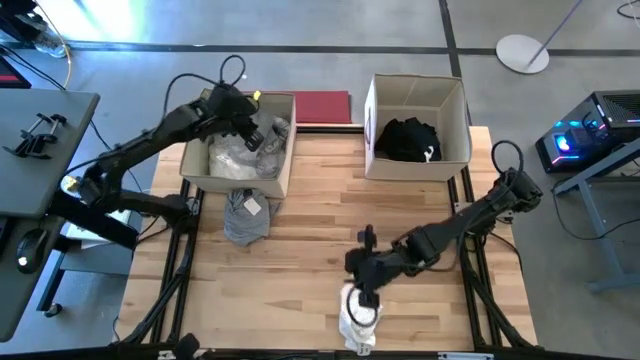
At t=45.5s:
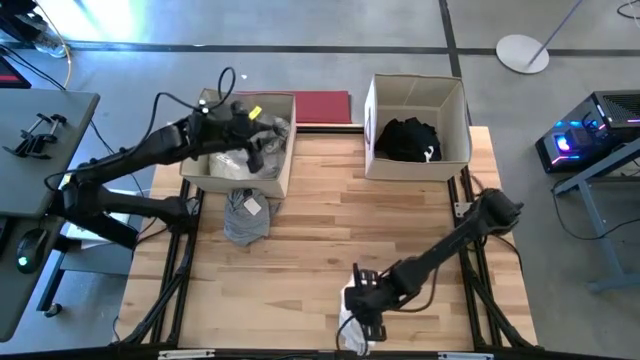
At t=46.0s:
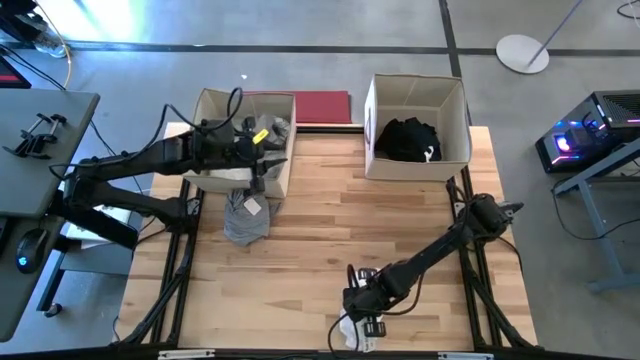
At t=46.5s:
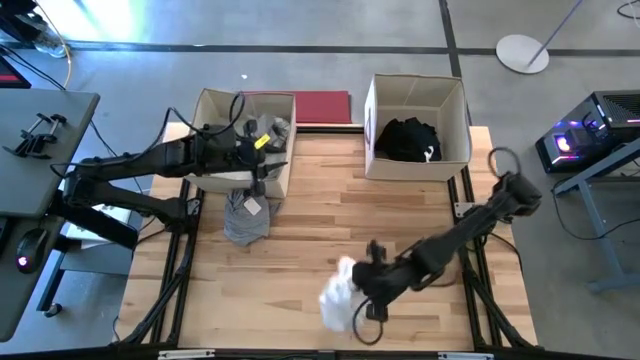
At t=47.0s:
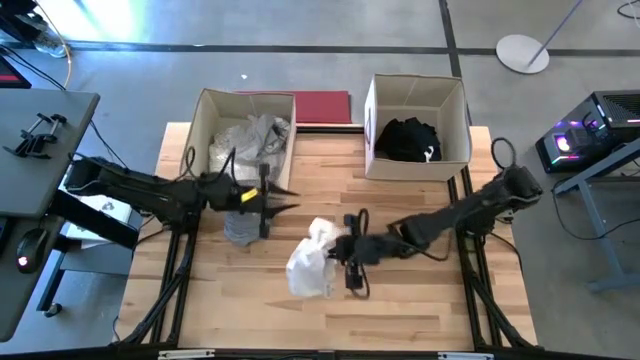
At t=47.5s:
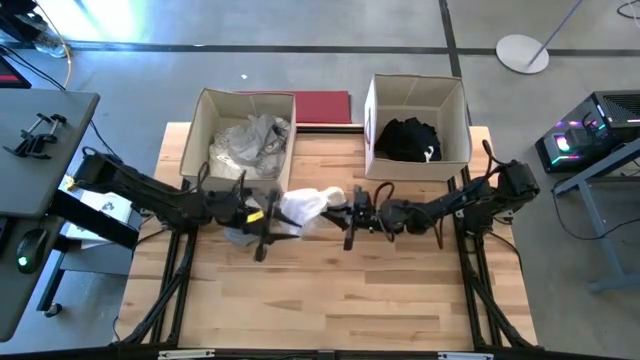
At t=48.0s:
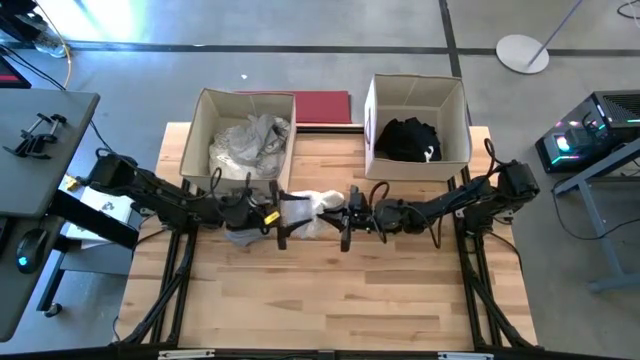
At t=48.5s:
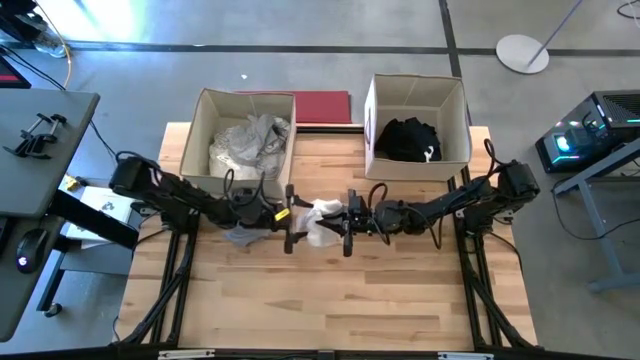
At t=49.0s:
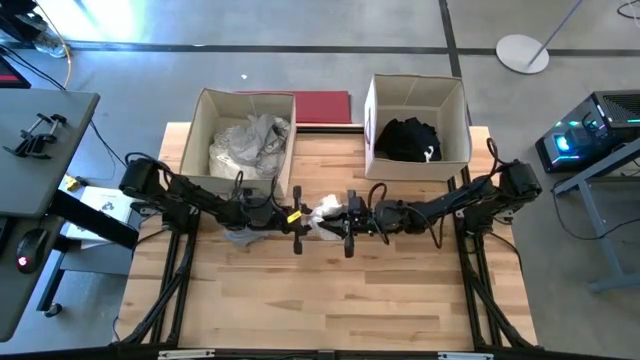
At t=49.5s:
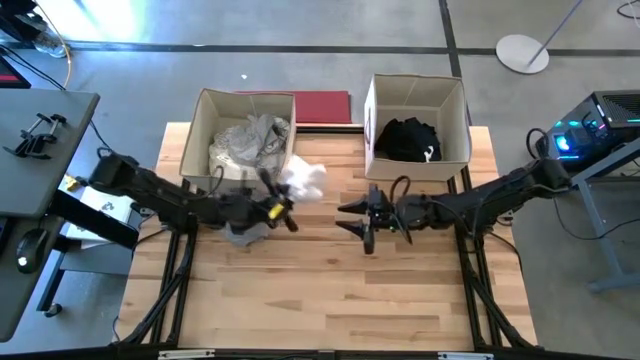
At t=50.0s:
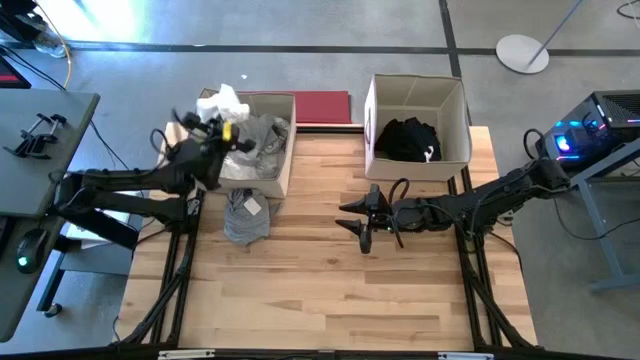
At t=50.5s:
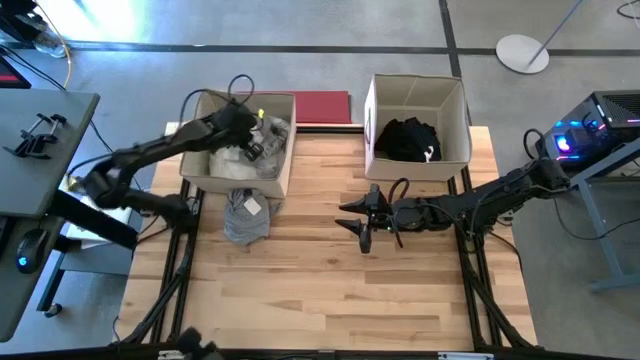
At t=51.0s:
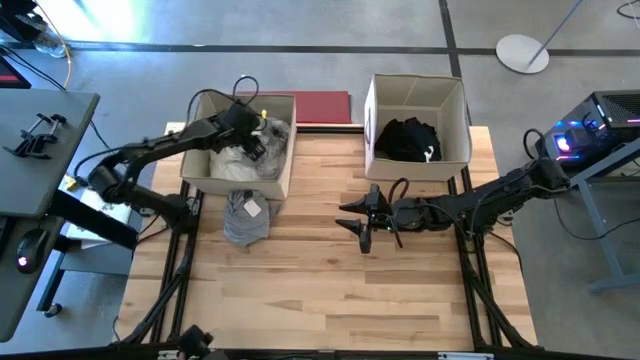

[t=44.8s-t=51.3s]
Put the white shorts into the left laundry organizer

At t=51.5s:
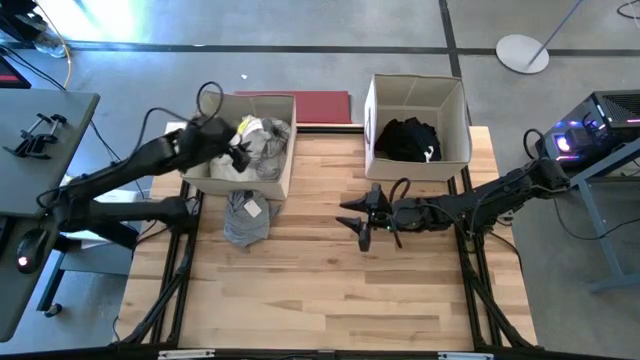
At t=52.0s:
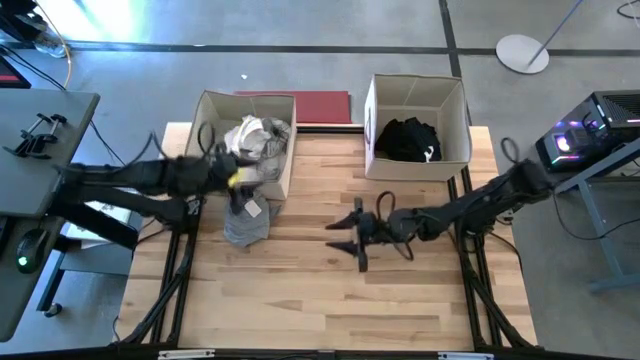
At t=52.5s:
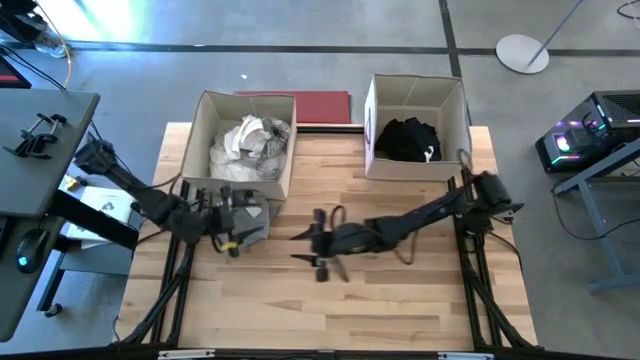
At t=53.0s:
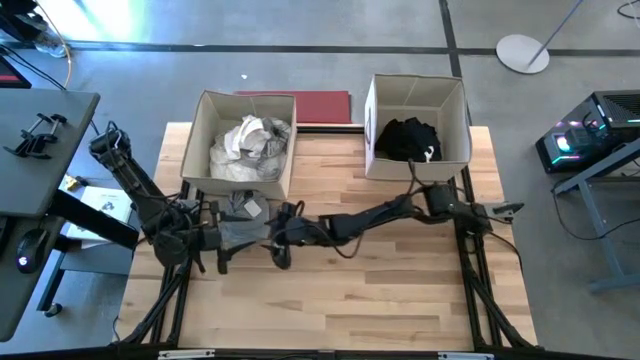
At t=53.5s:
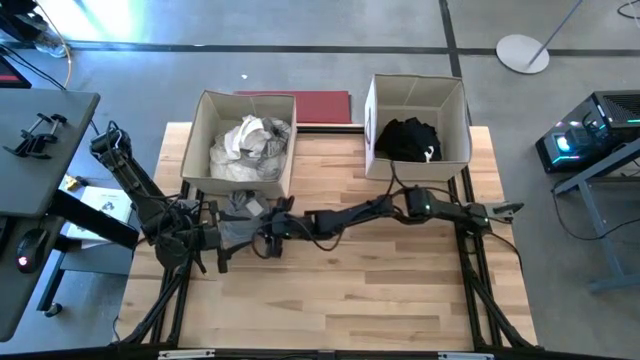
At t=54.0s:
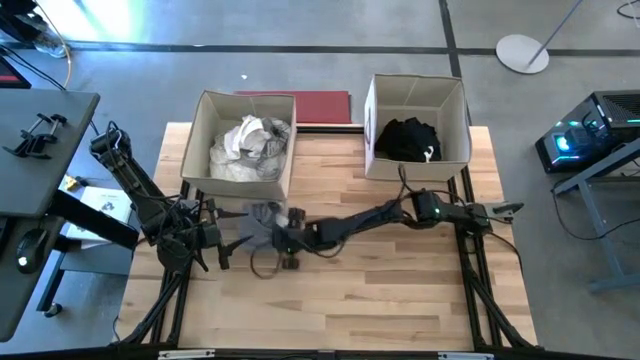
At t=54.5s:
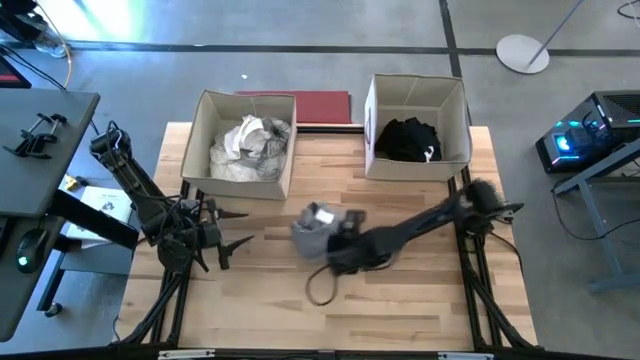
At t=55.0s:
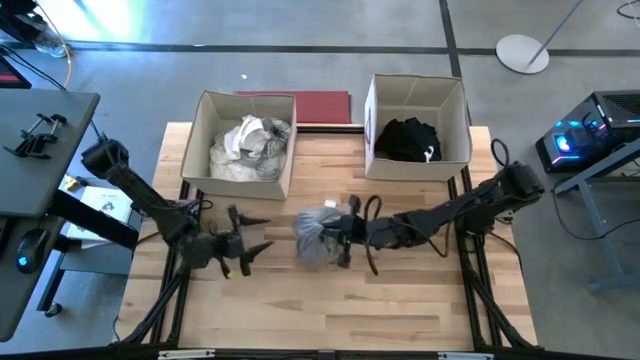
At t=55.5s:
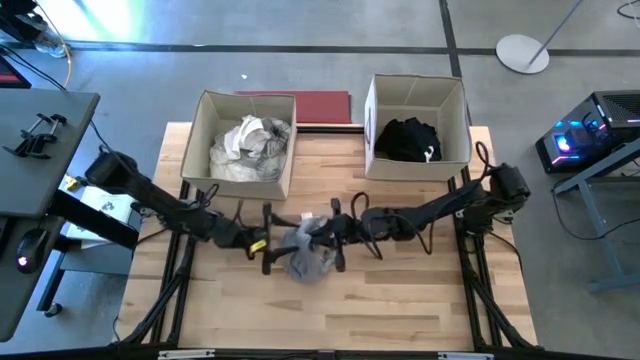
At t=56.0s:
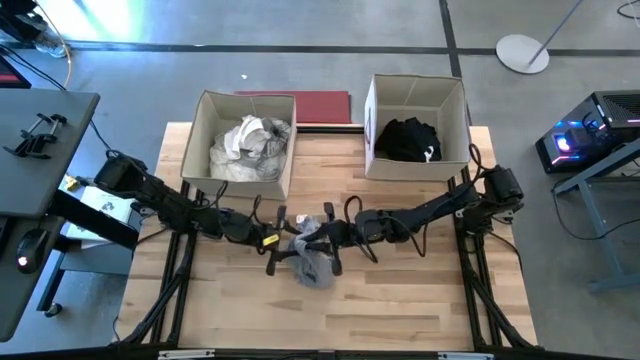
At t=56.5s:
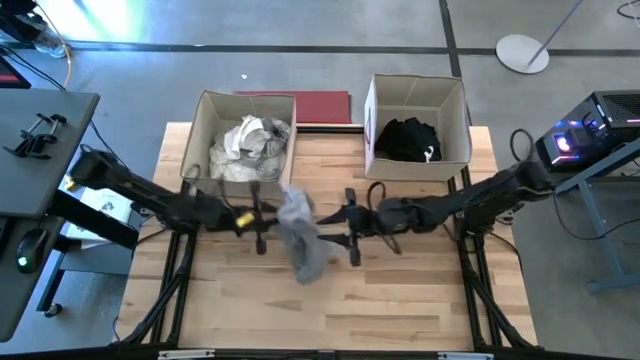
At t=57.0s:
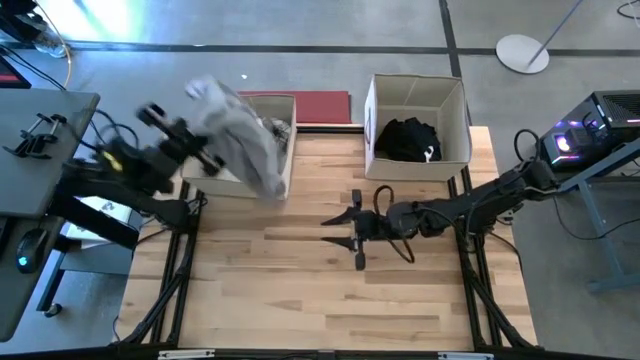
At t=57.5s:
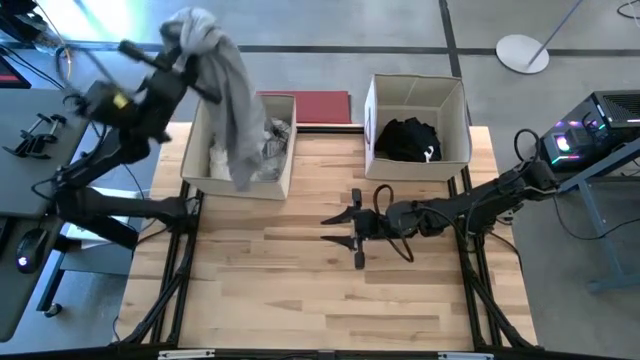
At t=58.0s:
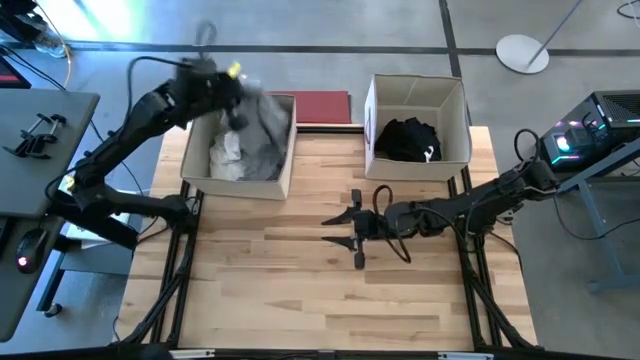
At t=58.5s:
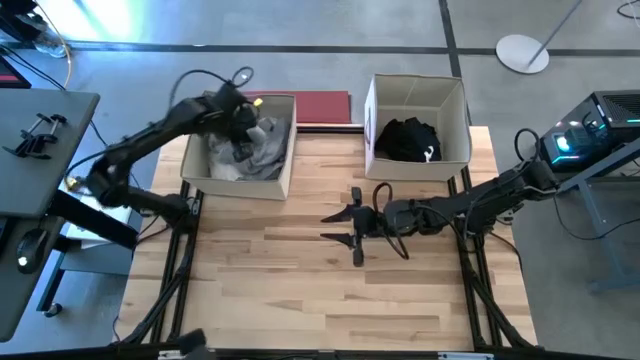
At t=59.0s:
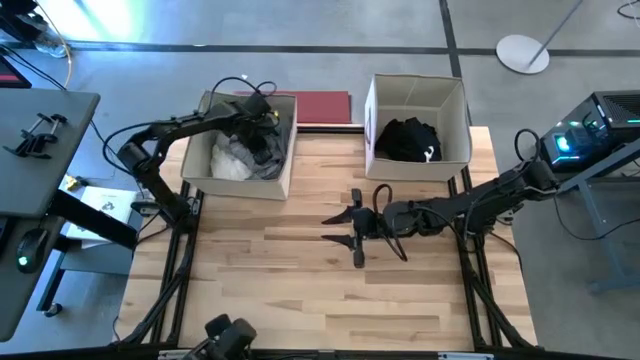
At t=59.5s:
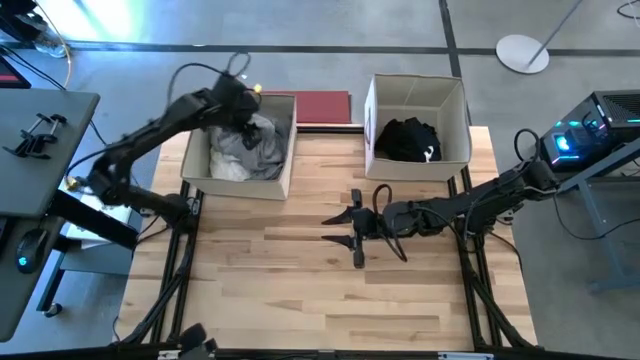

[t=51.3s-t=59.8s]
Put the gray pants into the left laundry organizer

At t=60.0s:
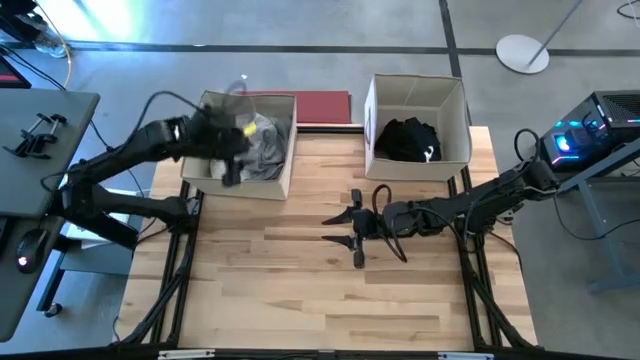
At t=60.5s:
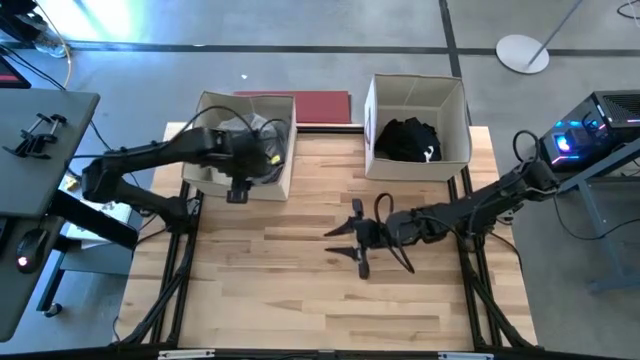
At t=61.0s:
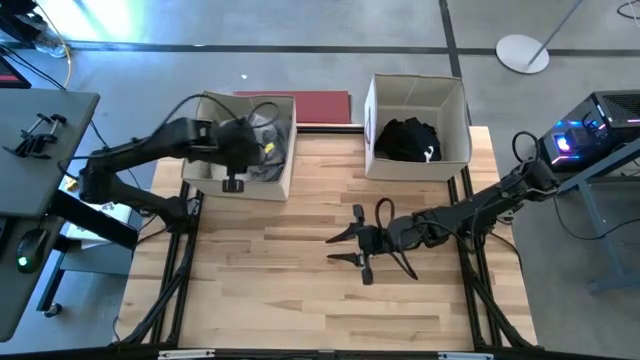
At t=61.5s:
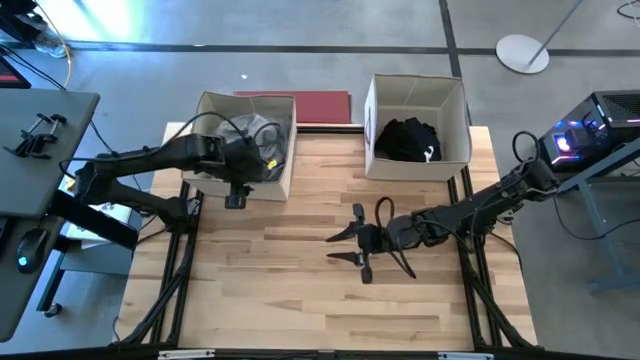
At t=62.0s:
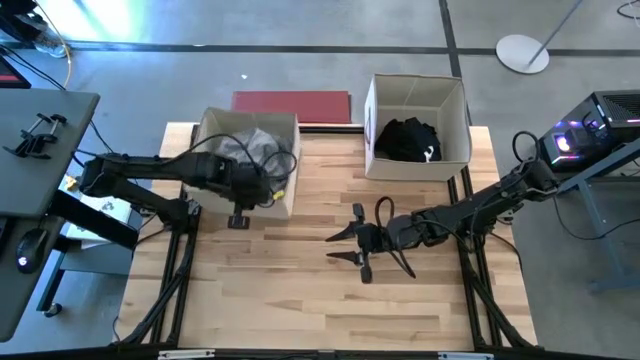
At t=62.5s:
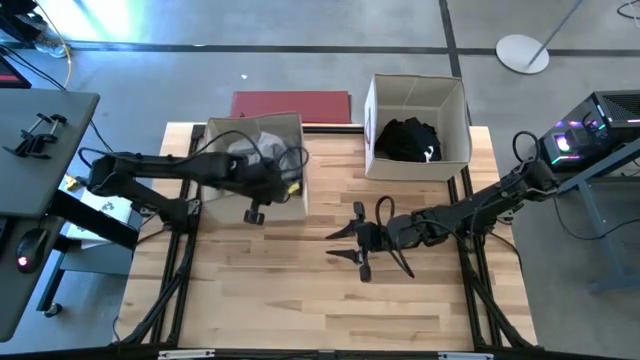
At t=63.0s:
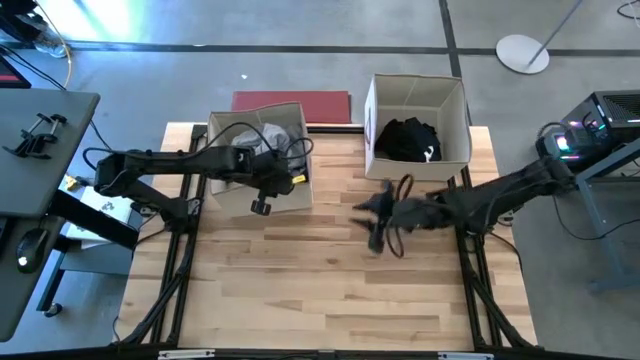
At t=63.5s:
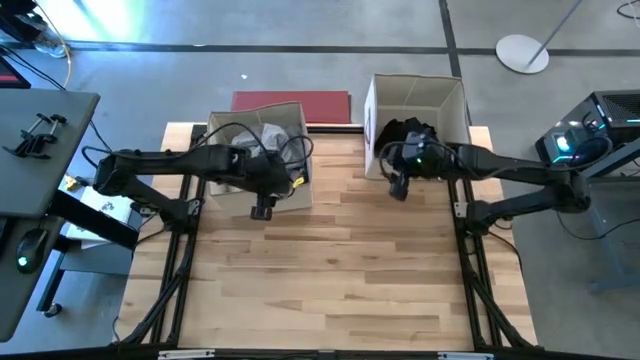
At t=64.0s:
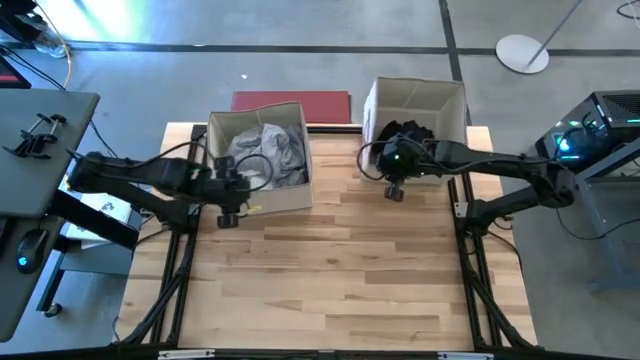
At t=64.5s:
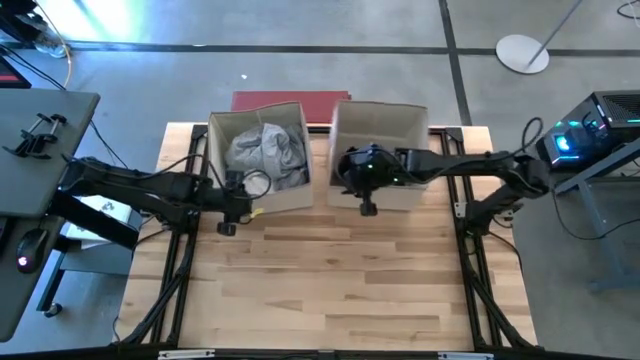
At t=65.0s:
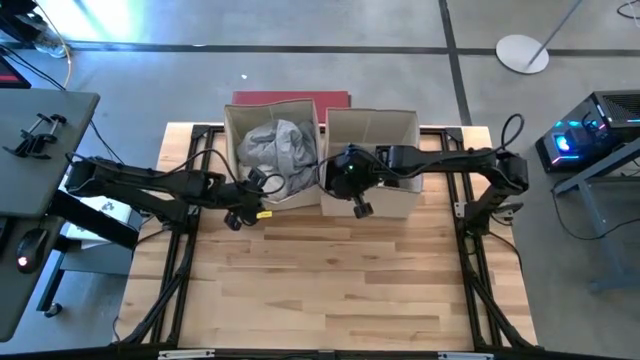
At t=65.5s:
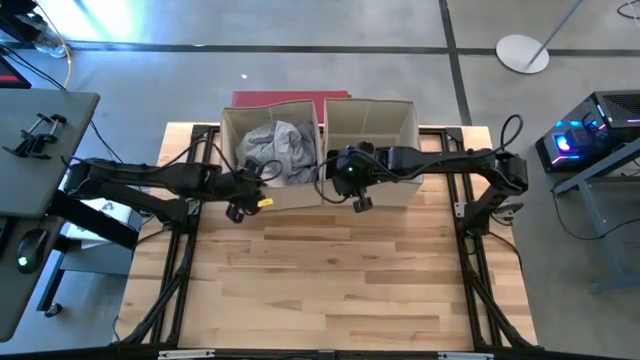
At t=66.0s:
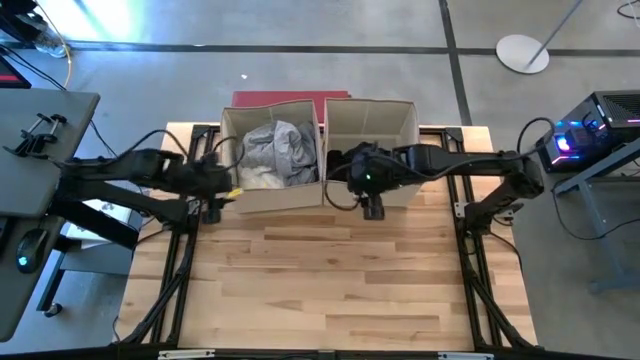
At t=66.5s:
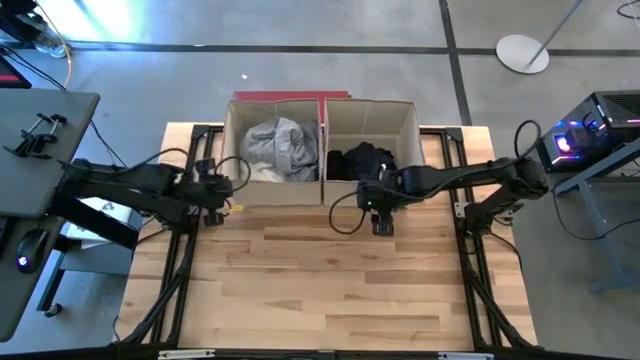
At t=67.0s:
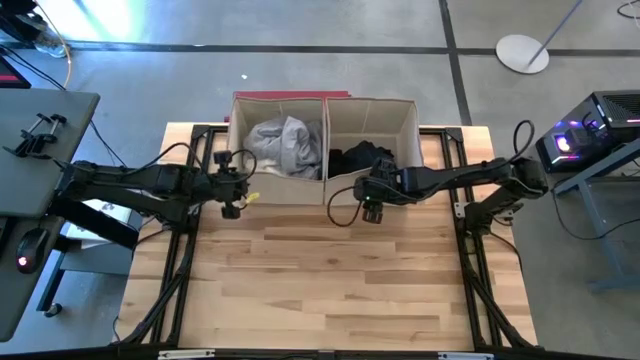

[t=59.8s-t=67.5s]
Adjust the laundry organizers
